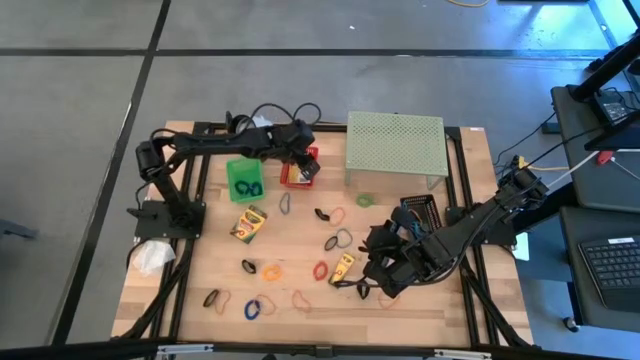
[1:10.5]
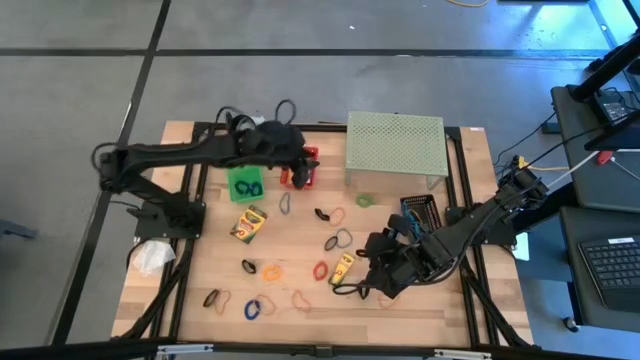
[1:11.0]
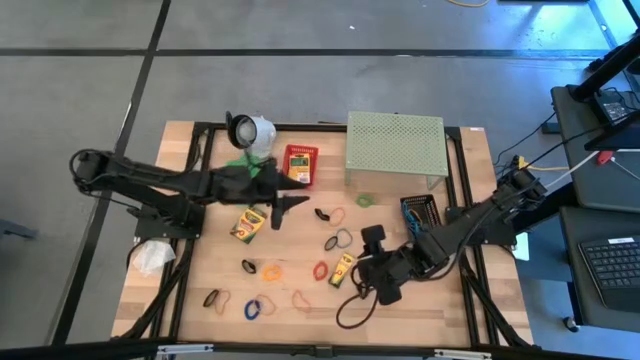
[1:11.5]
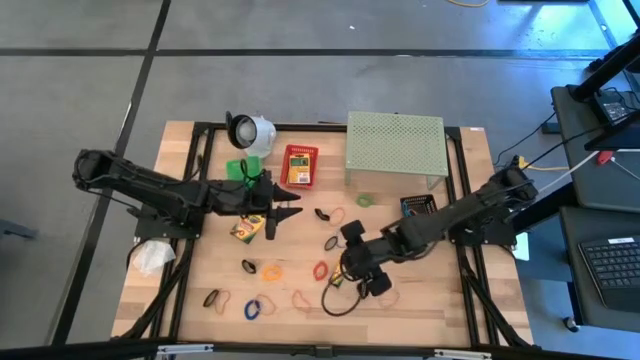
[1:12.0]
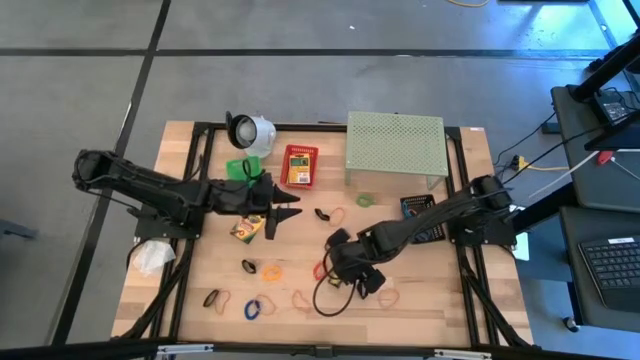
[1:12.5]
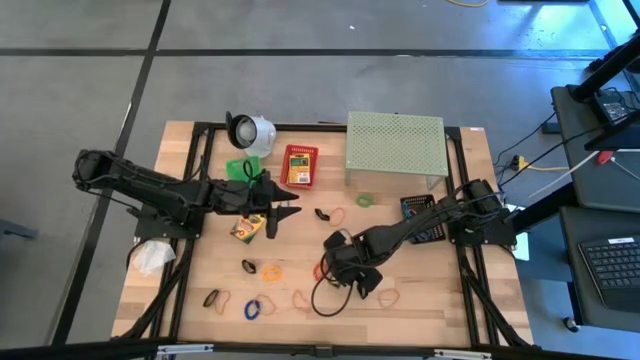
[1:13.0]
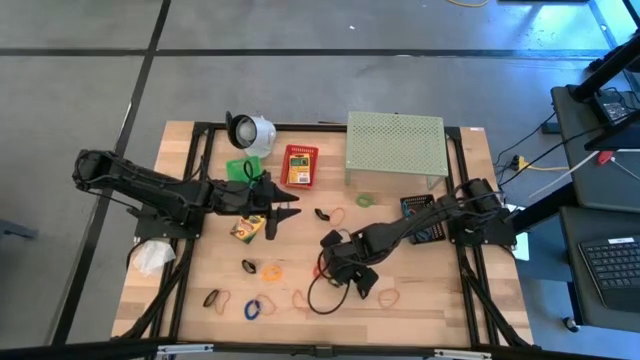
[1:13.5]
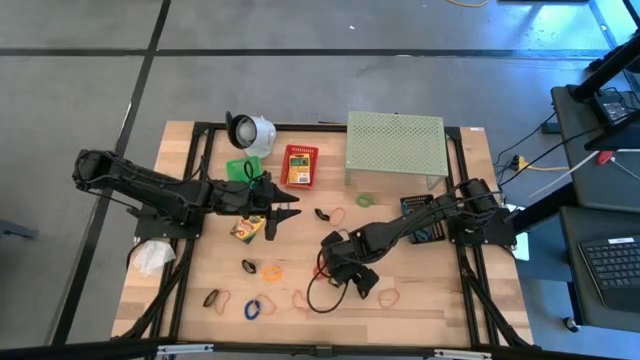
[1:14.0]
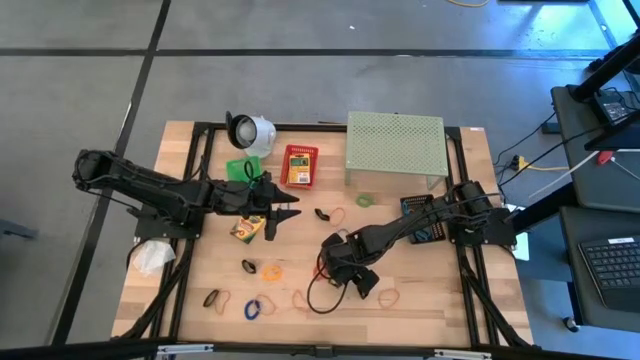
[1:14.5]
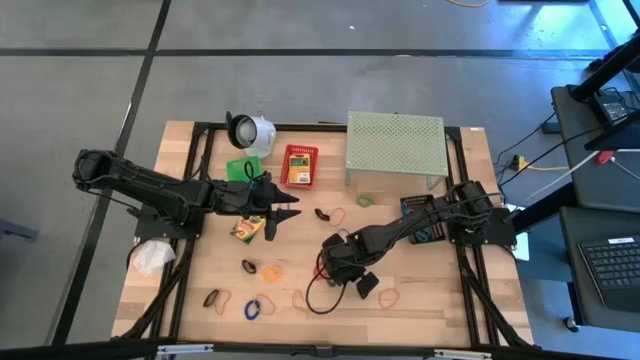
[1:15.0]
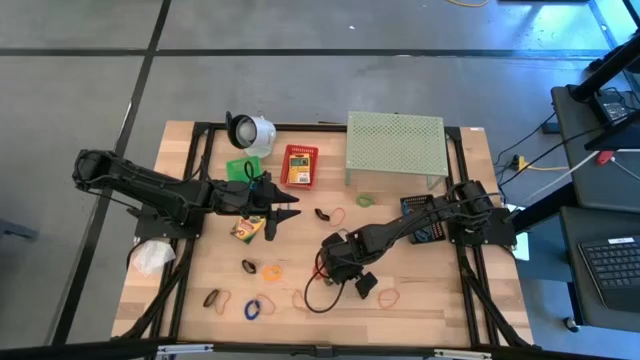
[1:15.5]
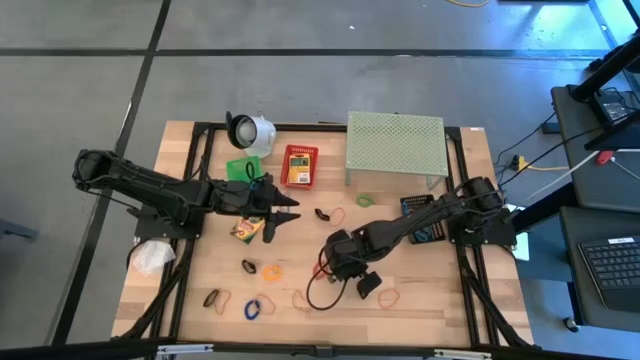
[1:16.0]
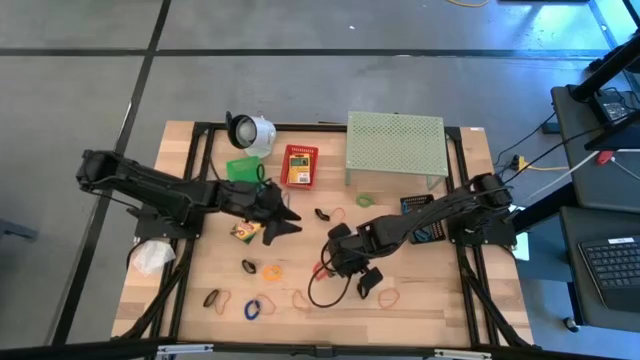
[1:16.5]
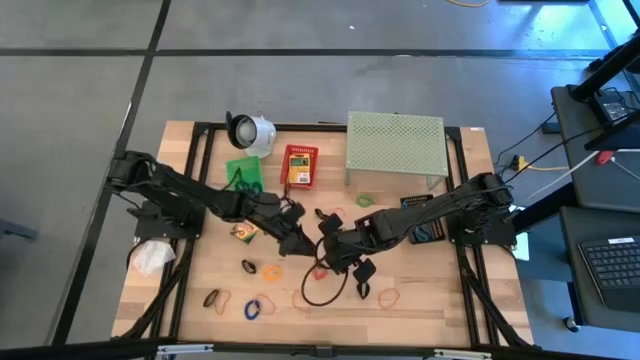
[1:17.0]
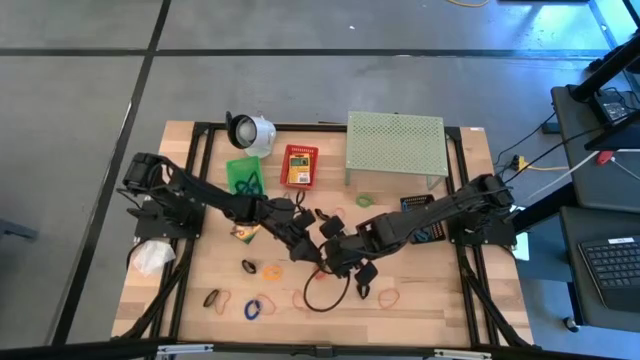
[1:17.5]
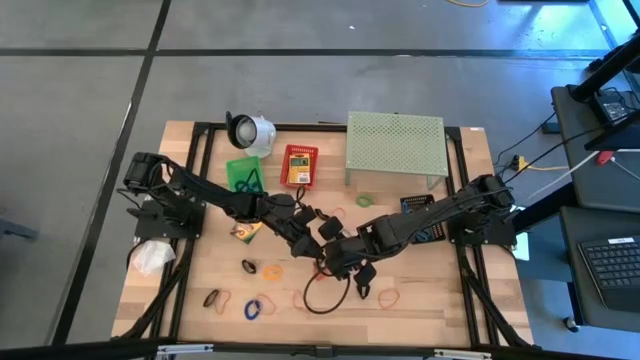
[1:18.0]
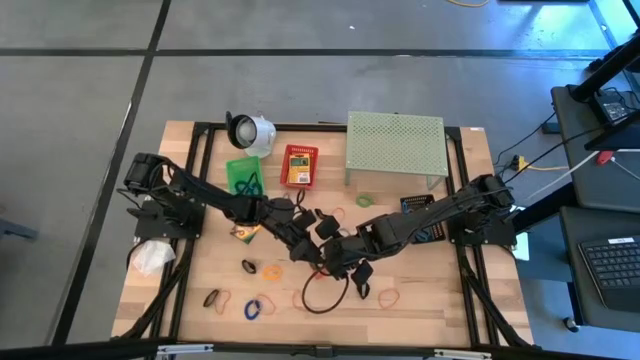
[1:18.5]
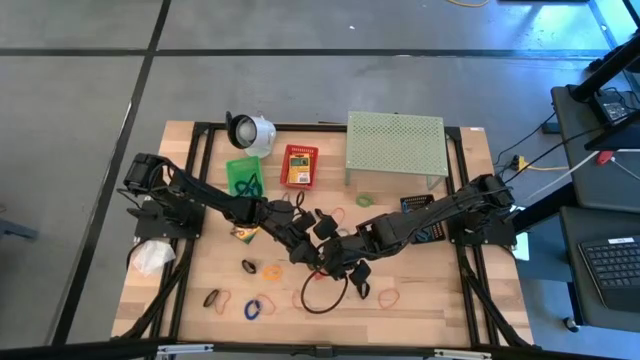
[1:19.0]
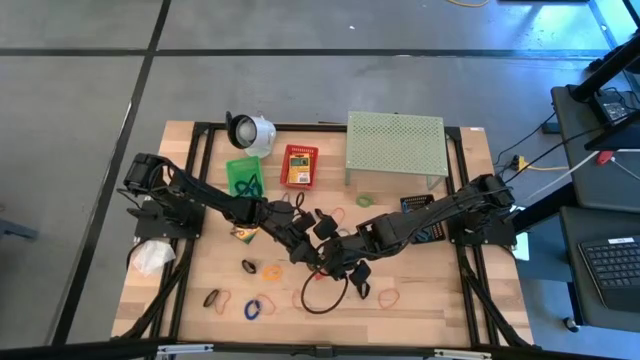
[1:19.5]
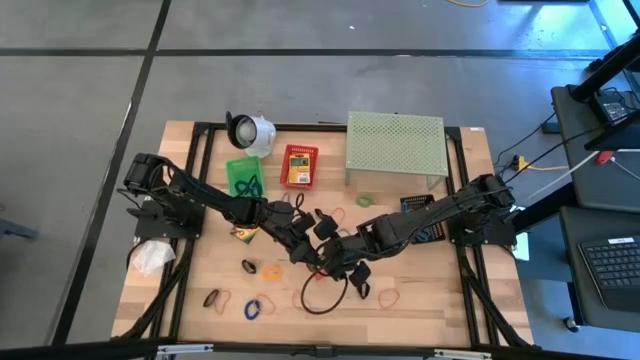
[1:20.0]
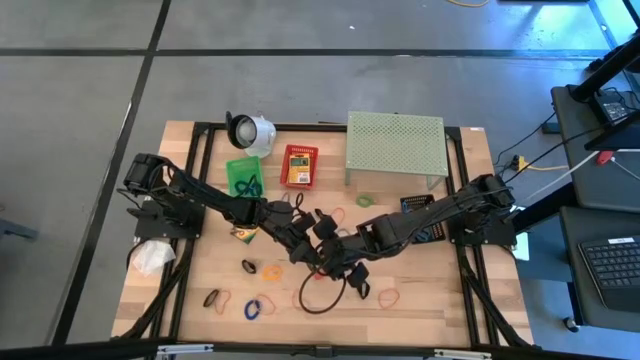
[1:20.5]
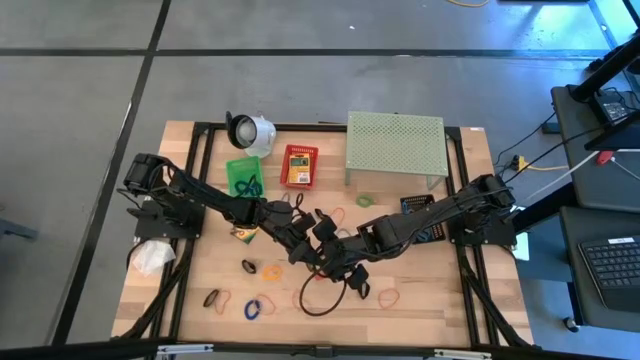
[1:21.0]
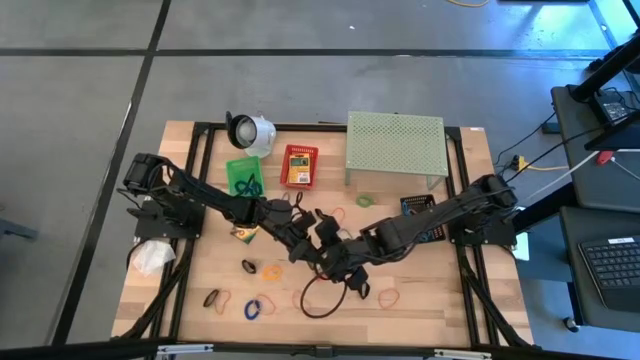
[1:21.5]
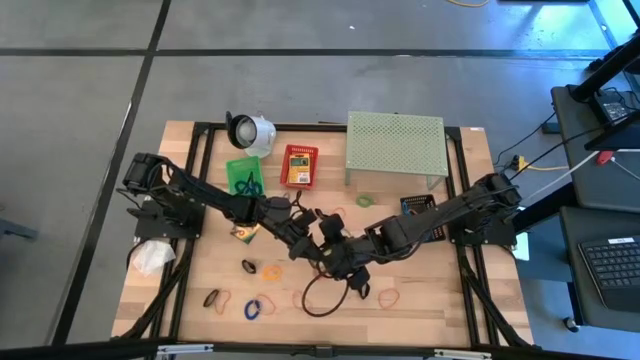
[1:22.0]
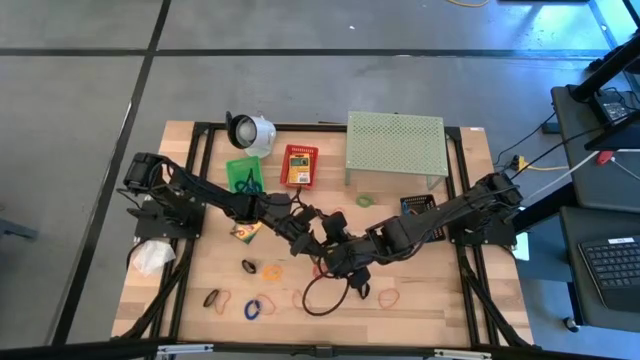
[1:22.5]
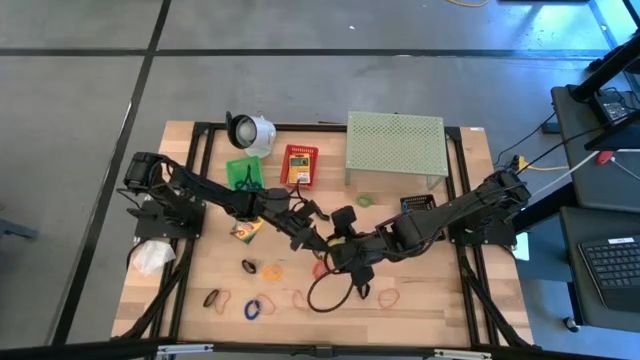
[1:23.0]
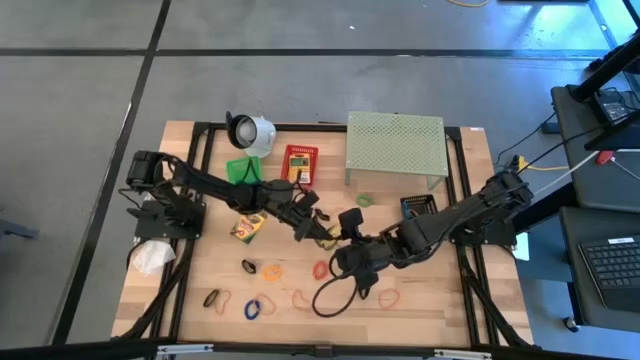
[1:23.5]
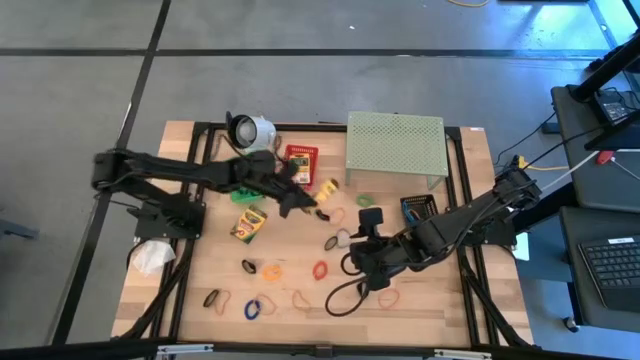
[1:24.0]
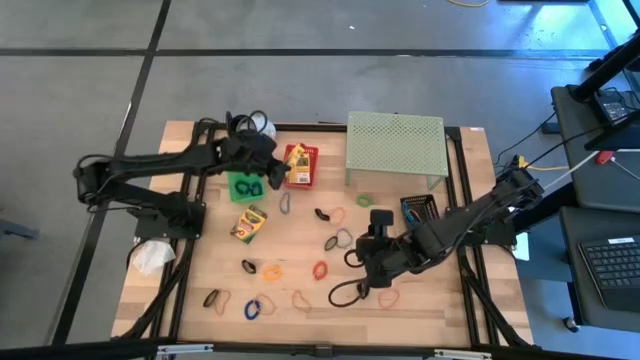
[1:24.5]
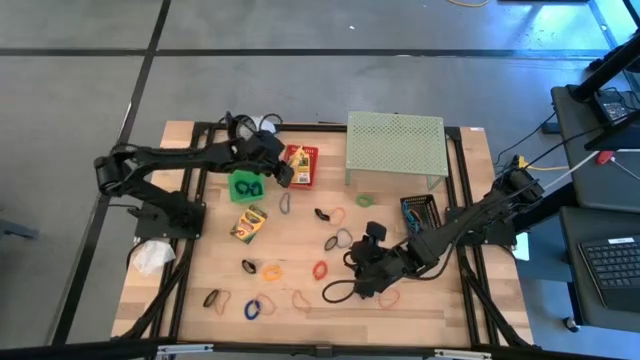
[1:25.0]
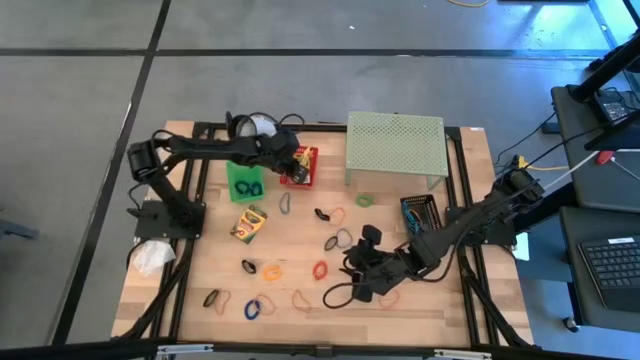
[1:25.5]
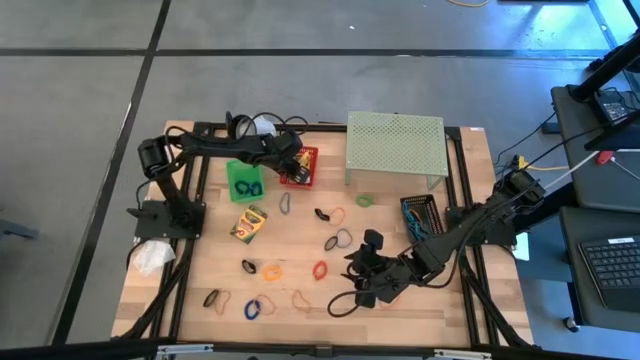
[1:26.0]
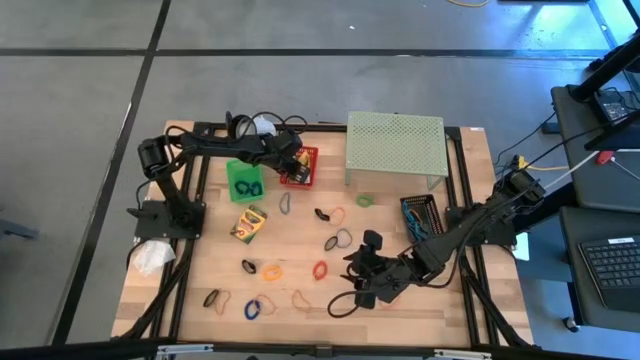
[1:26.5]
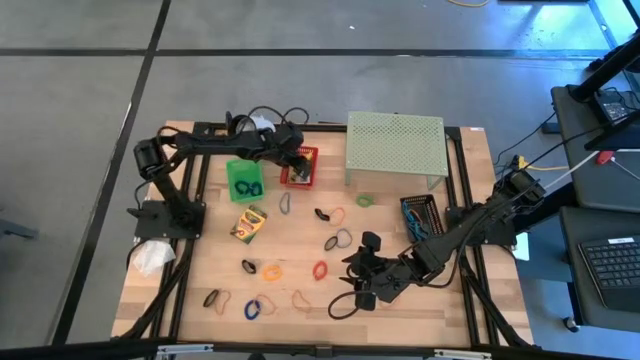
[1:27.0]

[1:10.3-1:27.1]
Task: Pick & Place Office Desk Supplies
Put the crayons box into the red basket

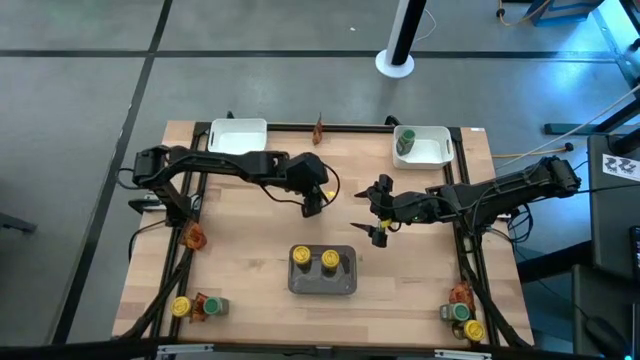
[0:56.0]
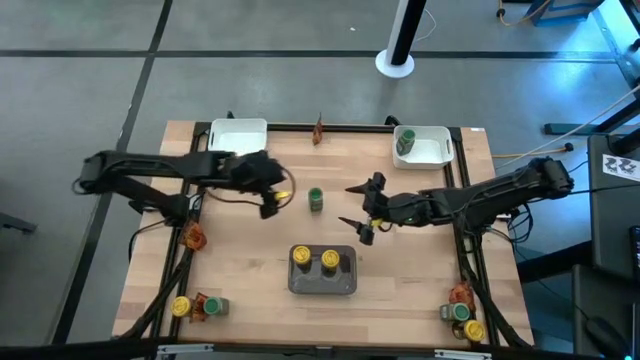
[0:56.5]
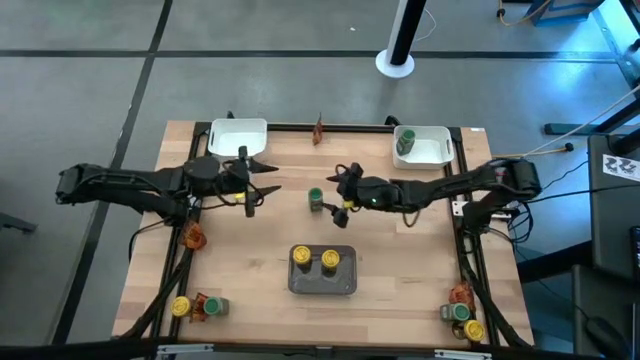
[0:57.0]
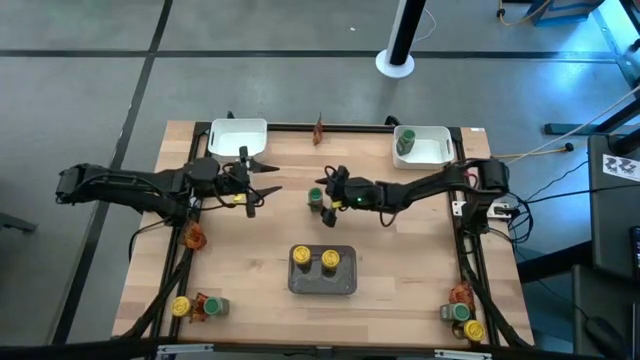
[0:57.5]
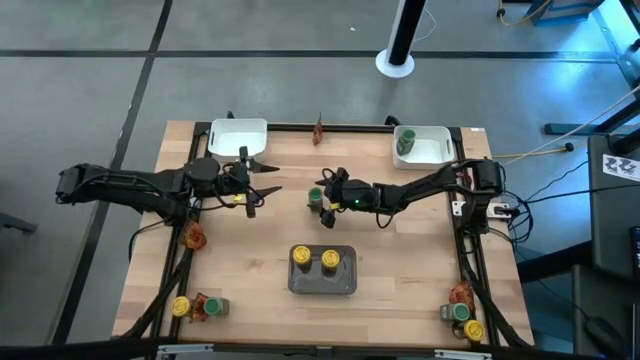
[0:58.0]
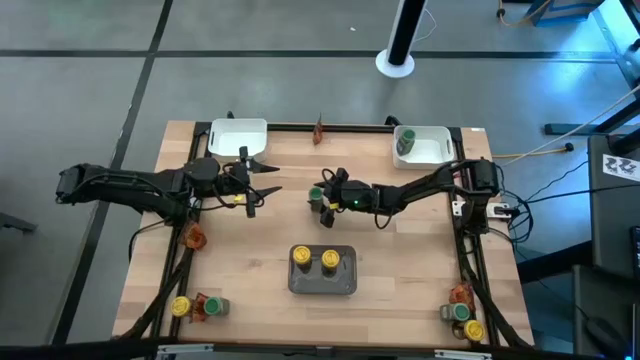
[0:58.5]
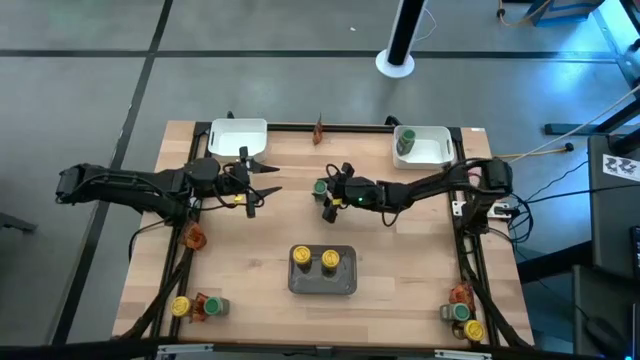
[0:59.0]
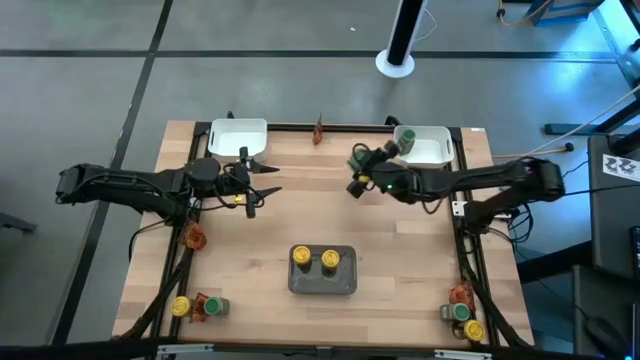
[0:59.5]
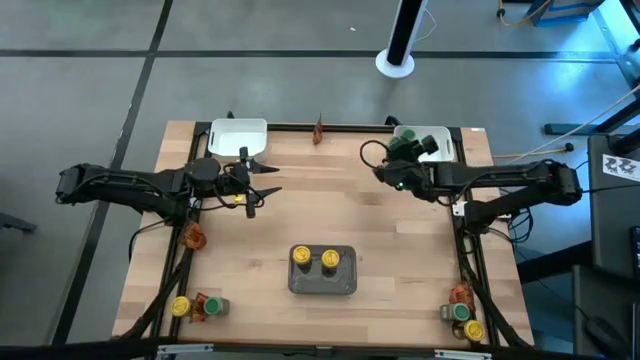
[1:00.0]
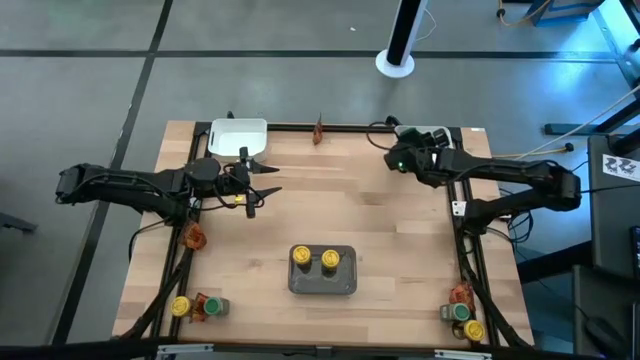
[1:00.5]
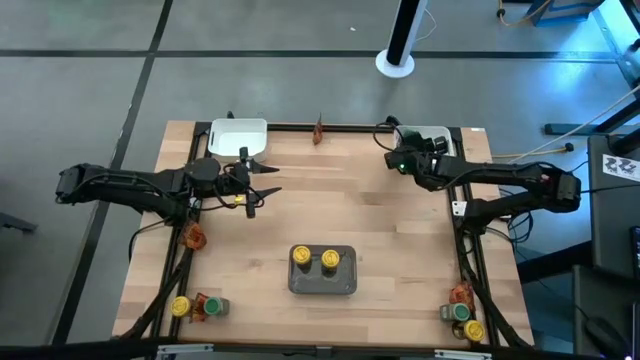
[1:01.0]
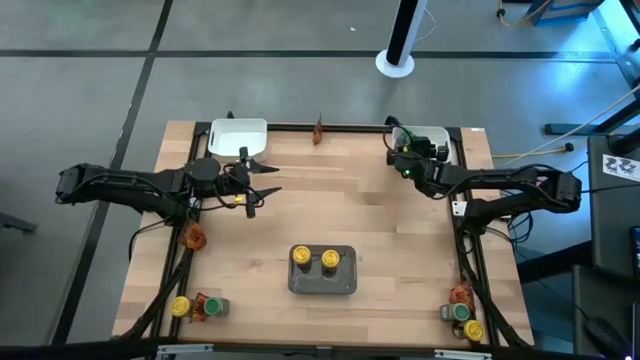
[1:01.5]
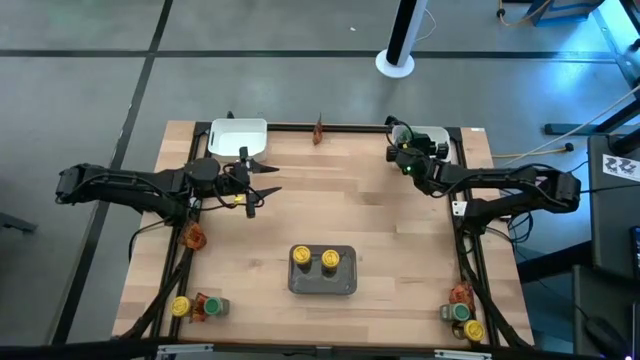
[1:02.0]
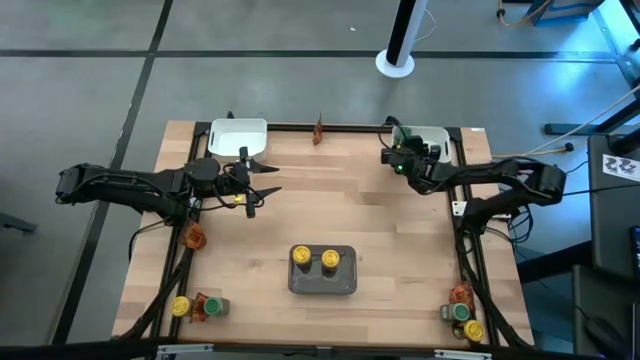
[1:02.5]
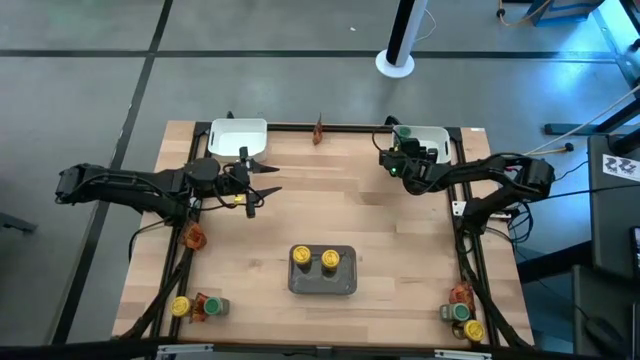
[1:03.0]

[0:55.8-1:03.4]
Task: Sort spices by type
Put the top center green seasoning bottle into the right white bin
